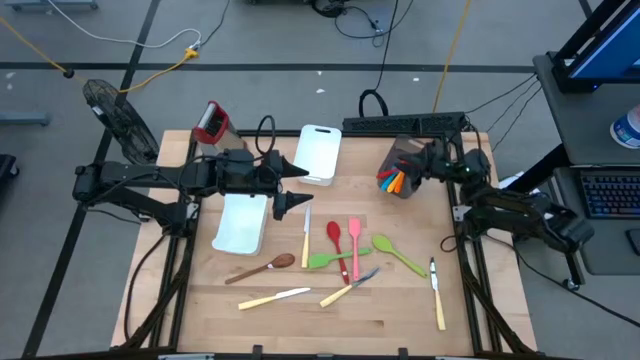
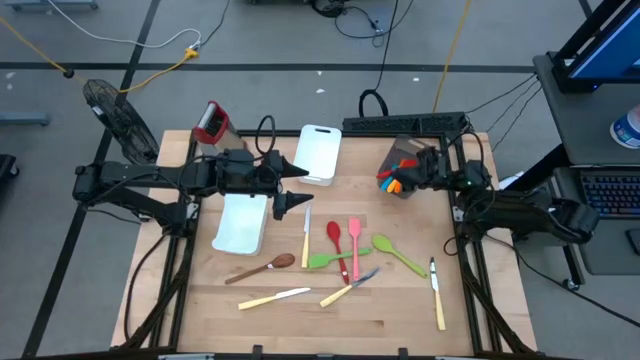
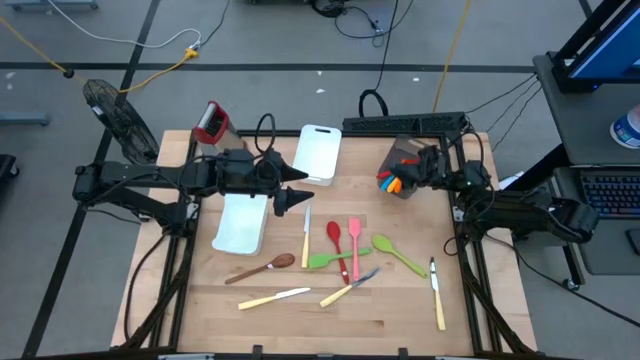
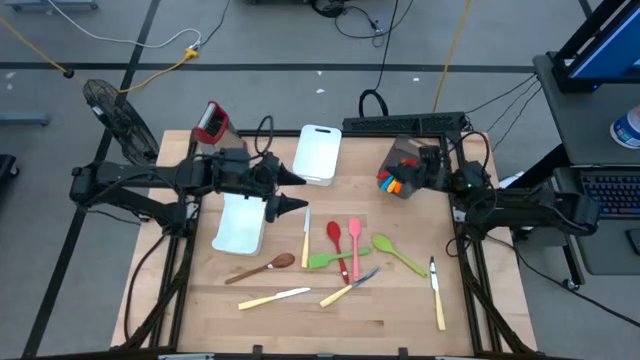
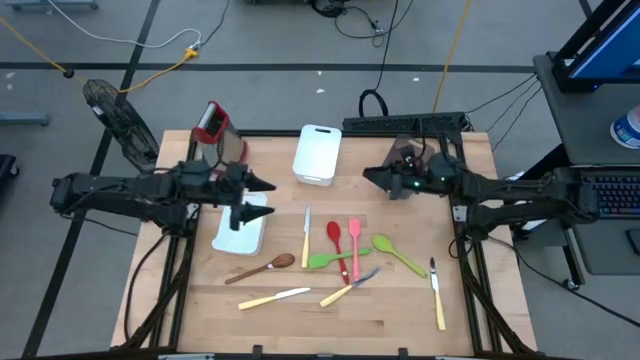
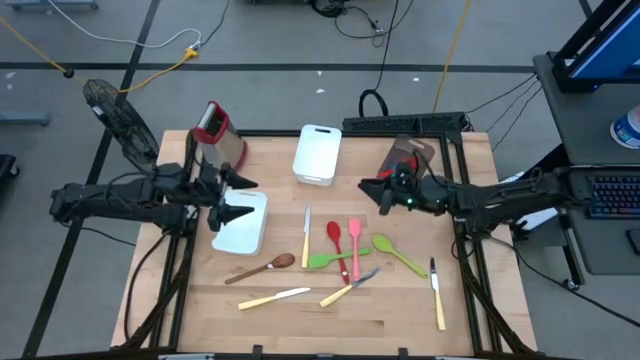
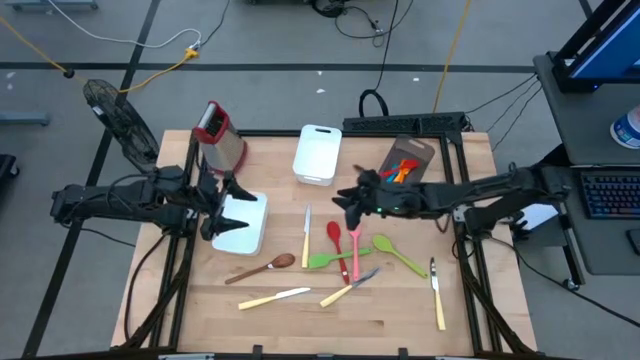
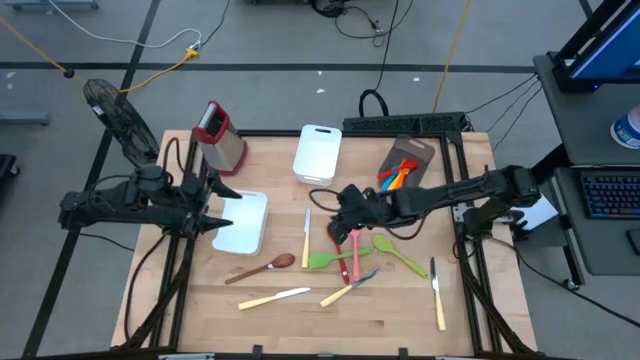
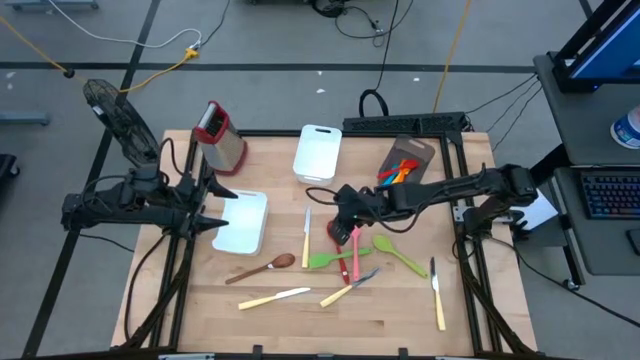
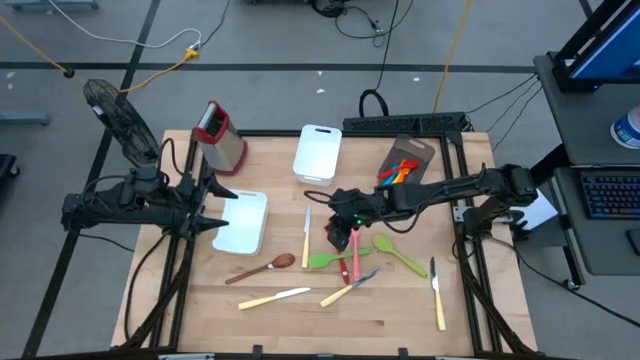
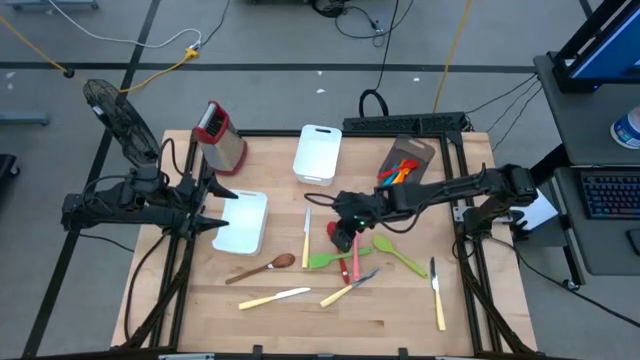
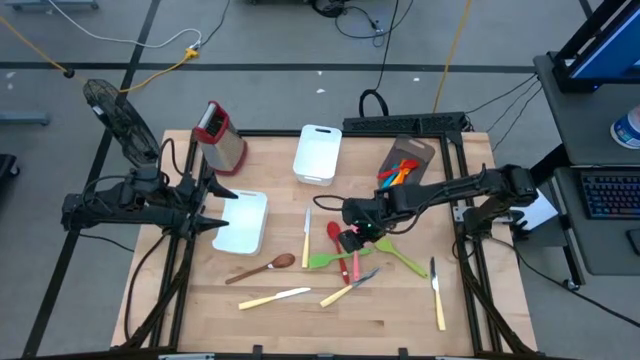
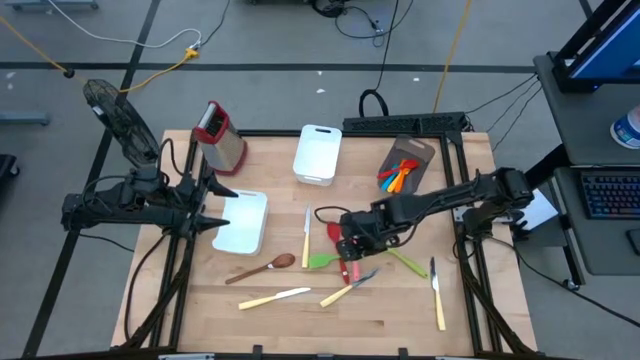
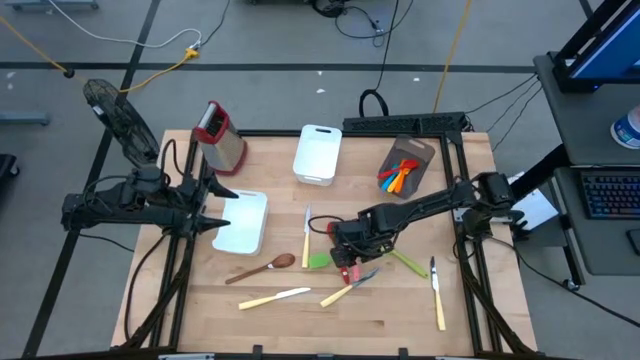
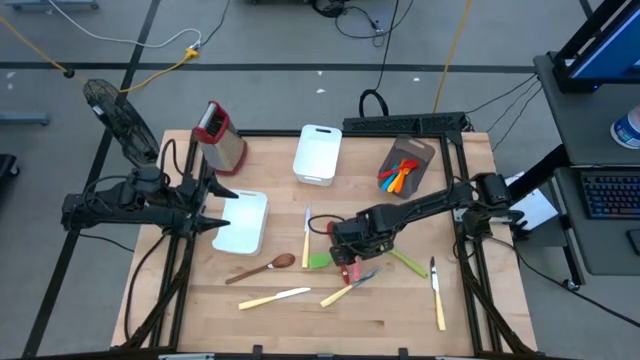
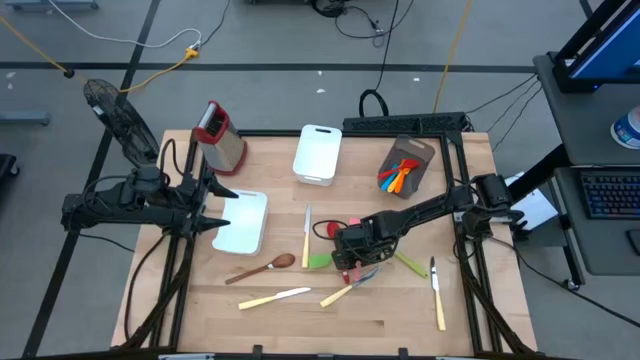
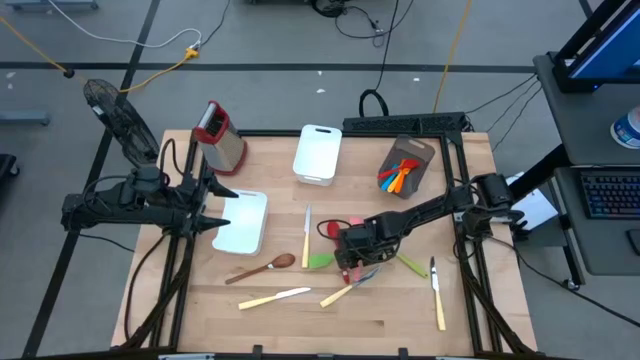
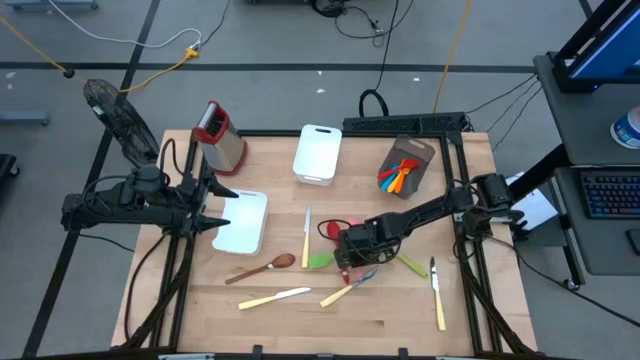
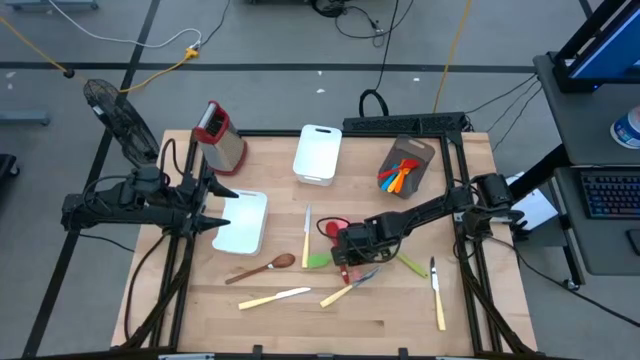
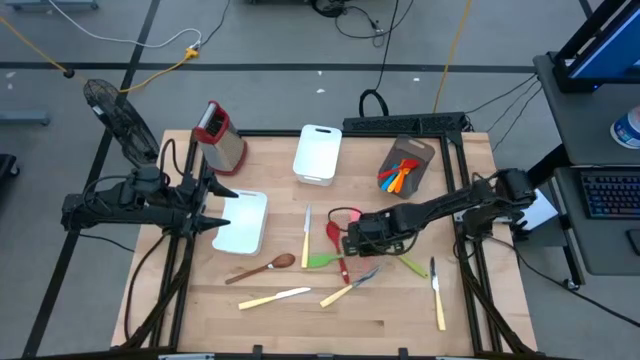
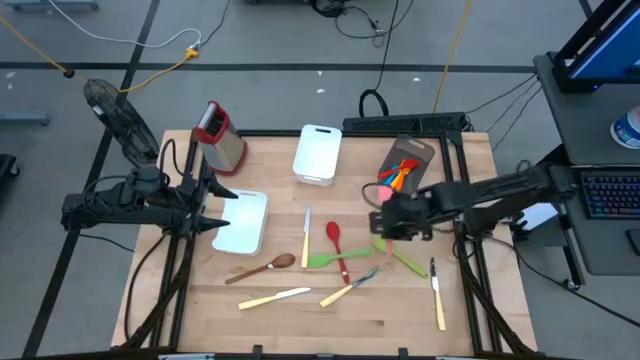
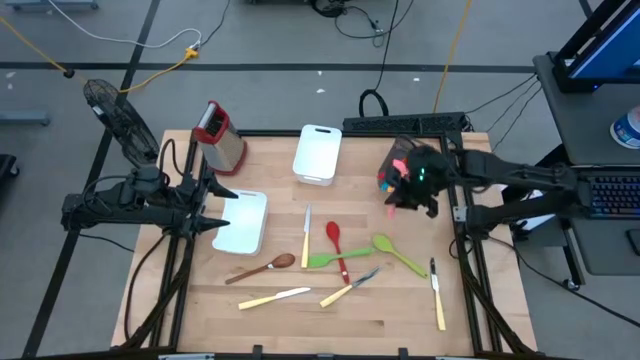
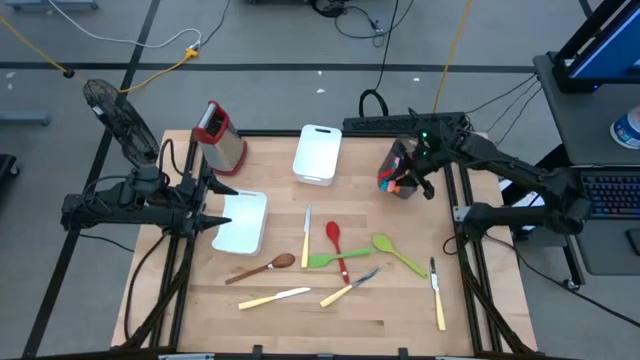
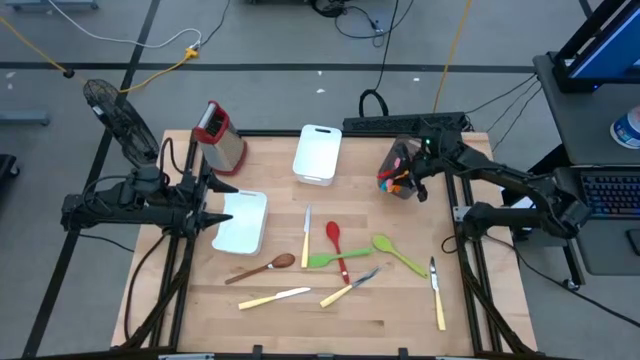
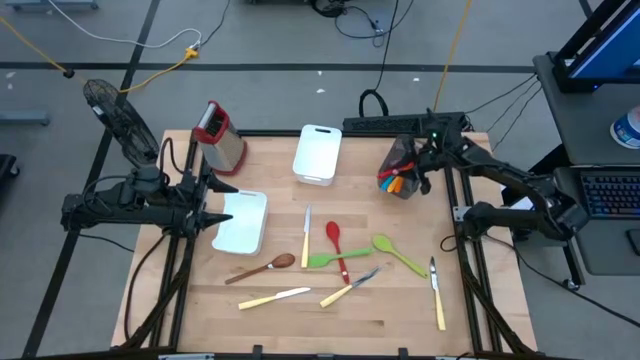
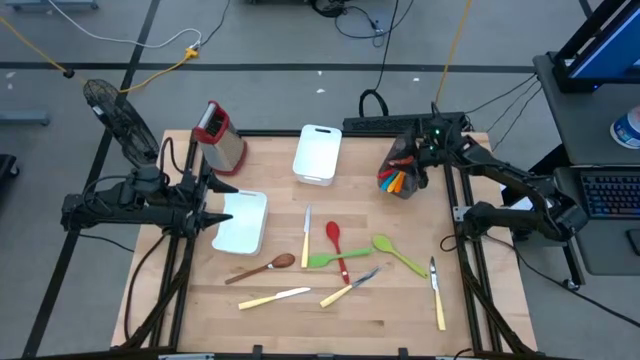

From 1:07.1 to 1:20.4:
Task: Pick & Place Kitchen Items
Put the pink spatula into the black bin

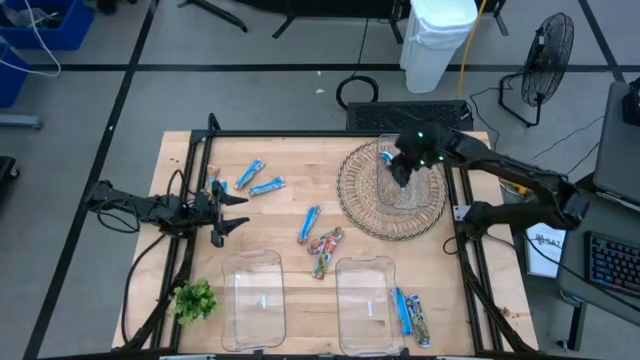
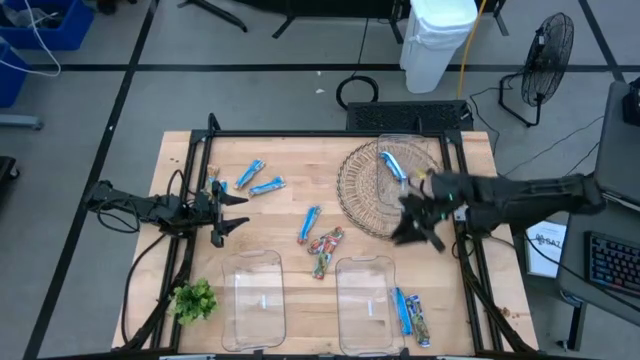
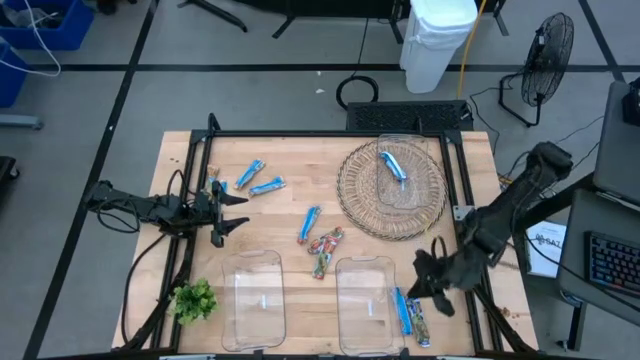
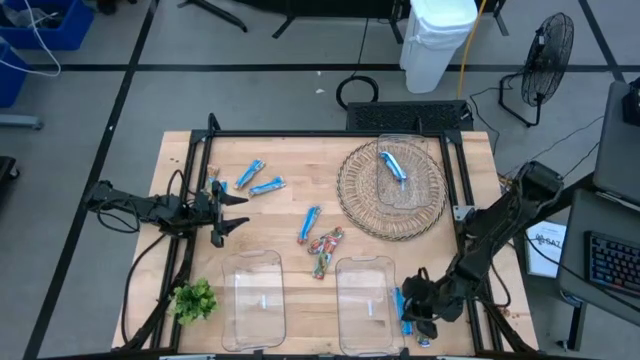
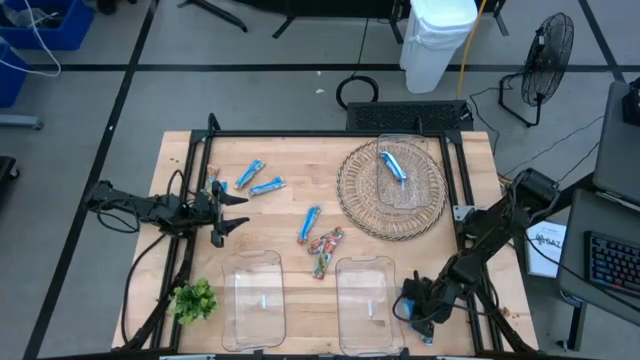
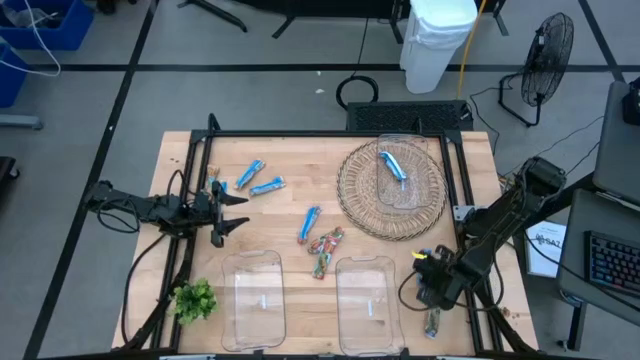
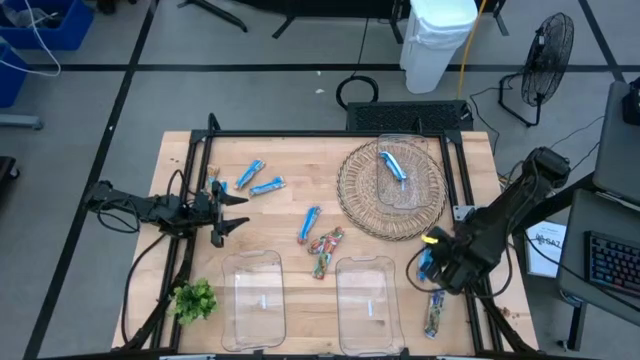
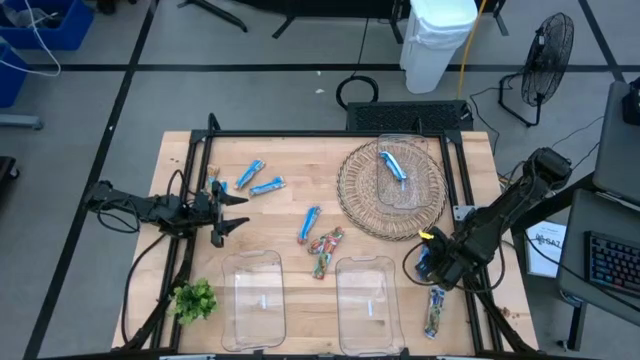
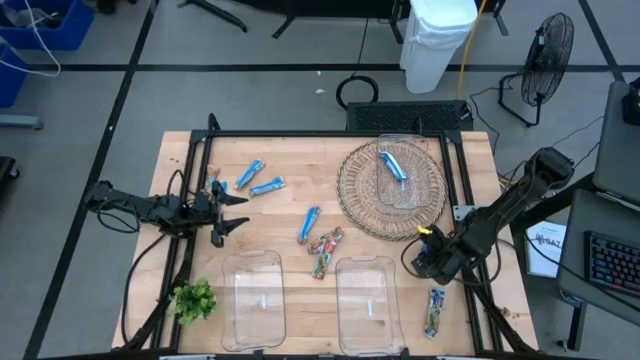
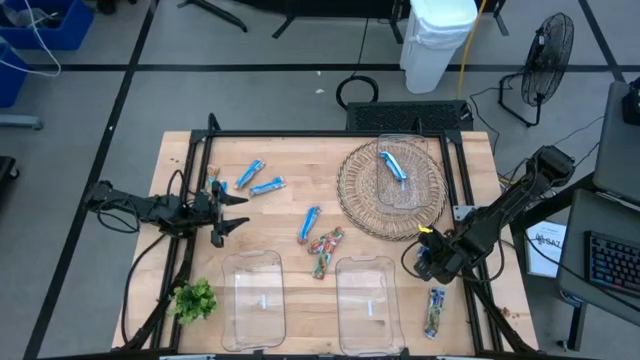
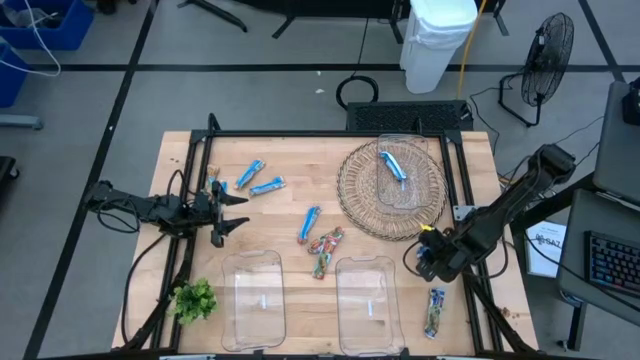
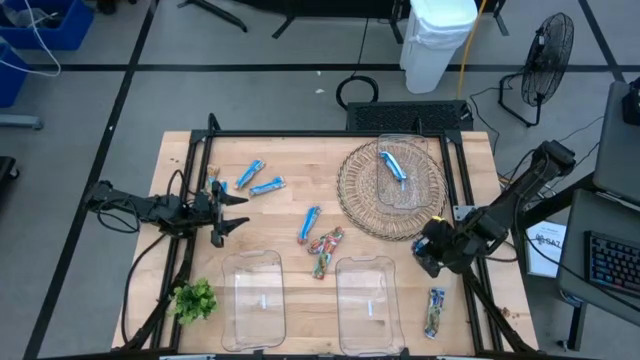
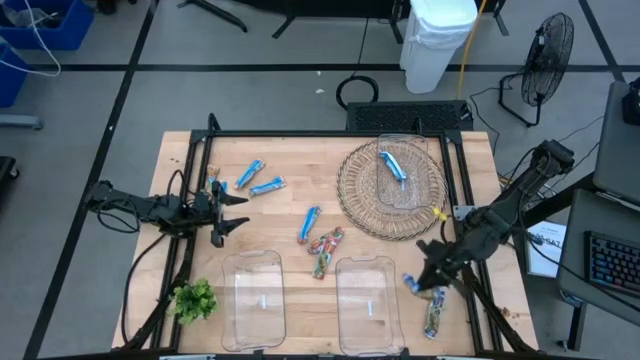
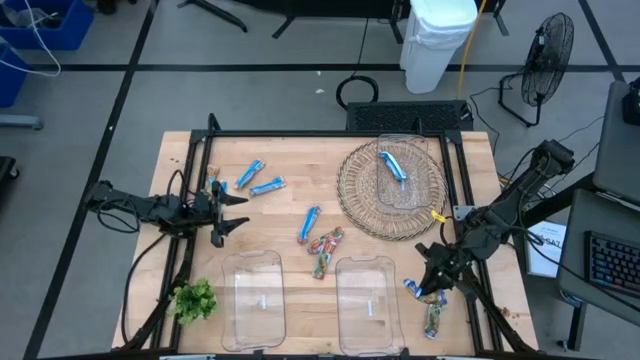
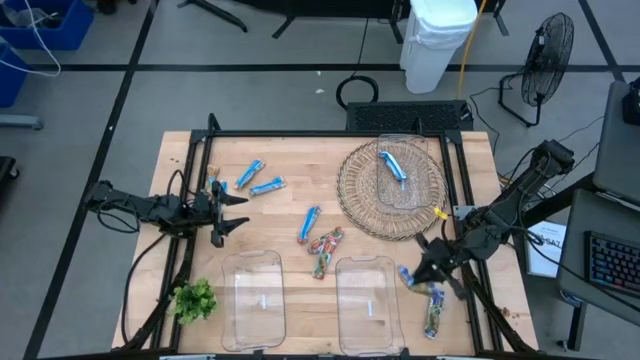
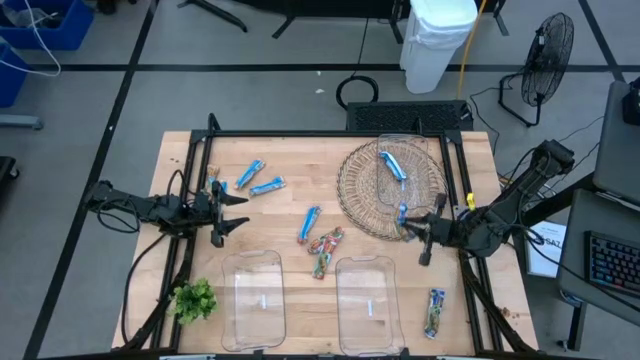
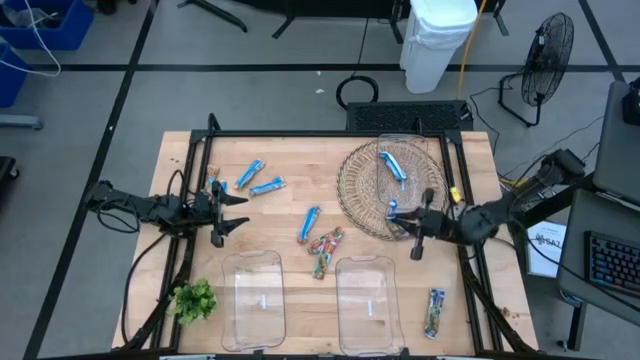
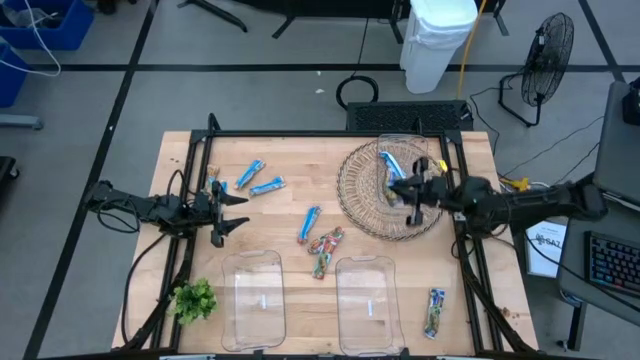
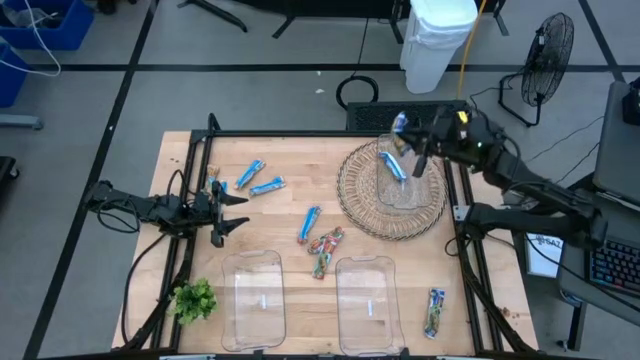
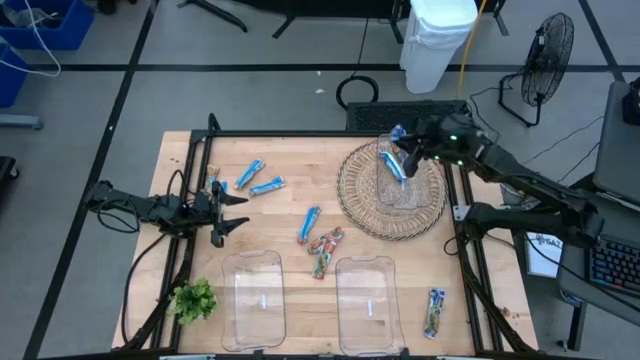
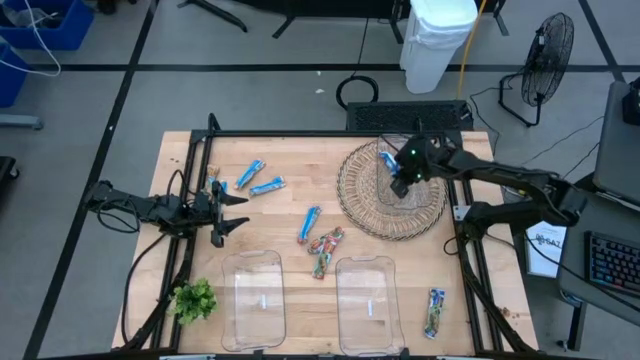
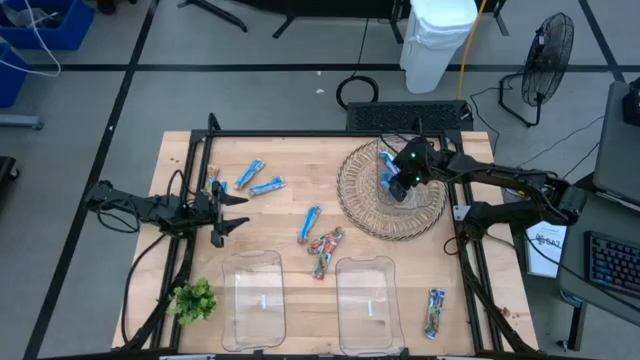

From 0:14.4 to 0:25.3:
Task: Pick and place Granola Bars by type
Put the left blue granola bar into the top transparent bin
